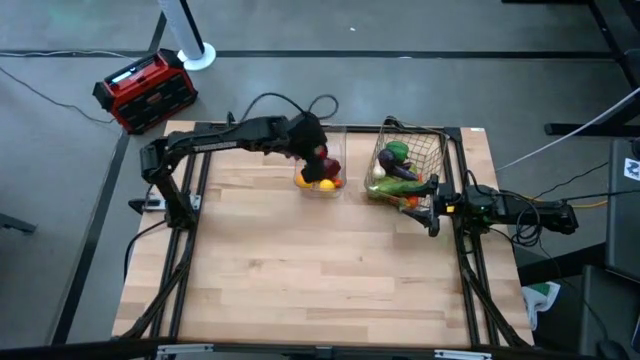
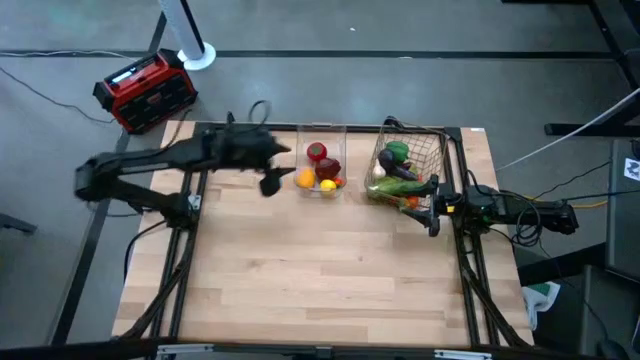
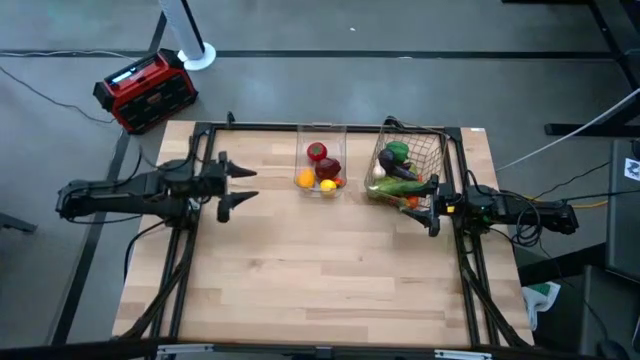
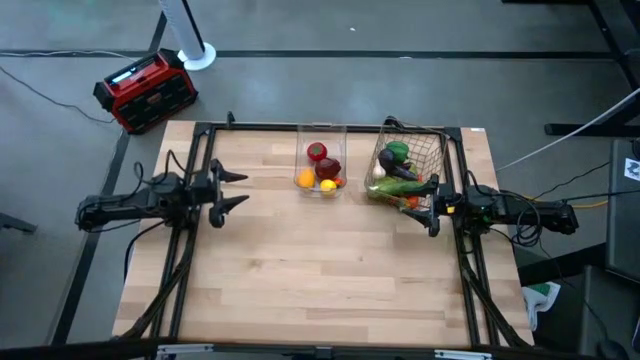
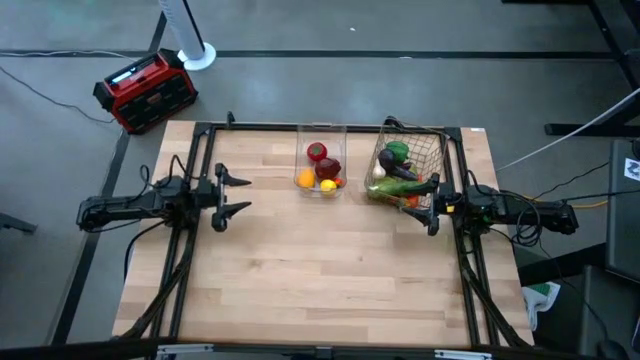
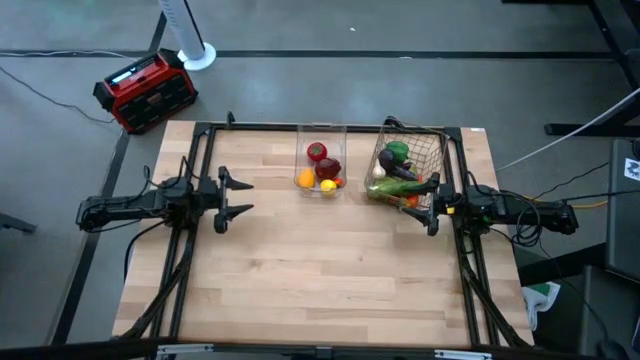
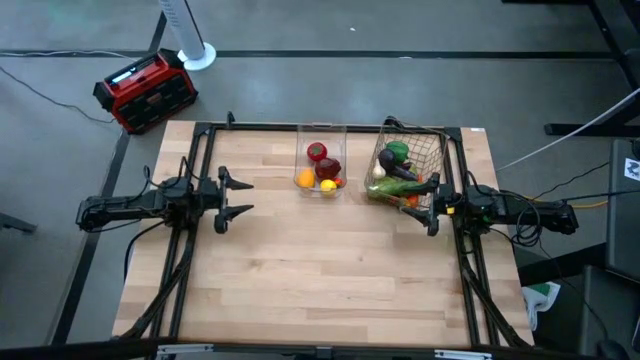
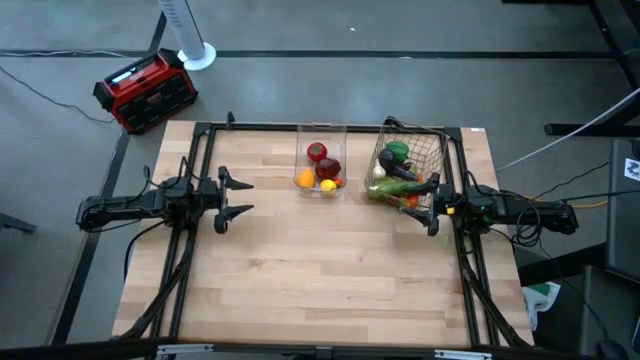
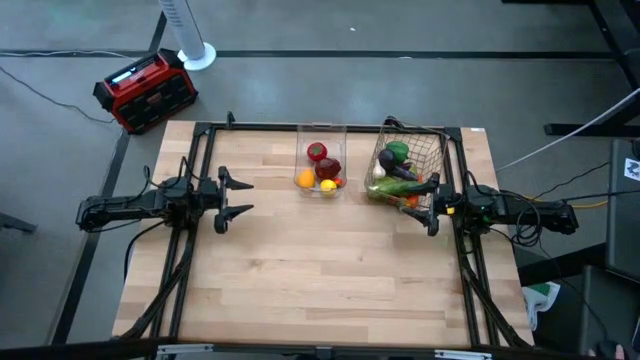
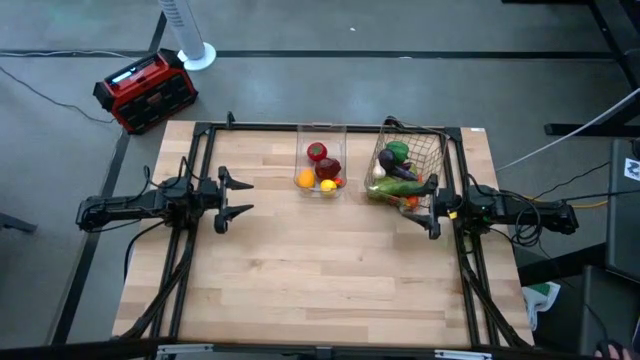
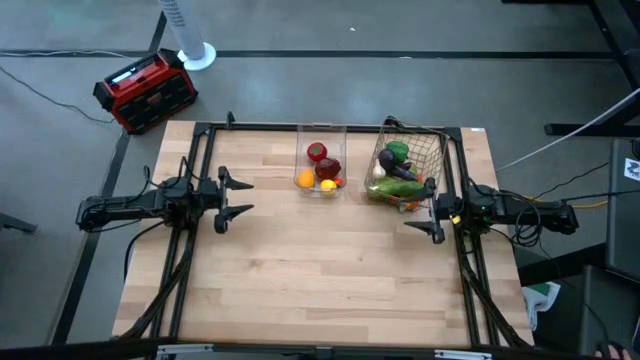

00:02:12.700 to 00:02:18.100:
Task: Sort produce into baskets
Return to Home Position

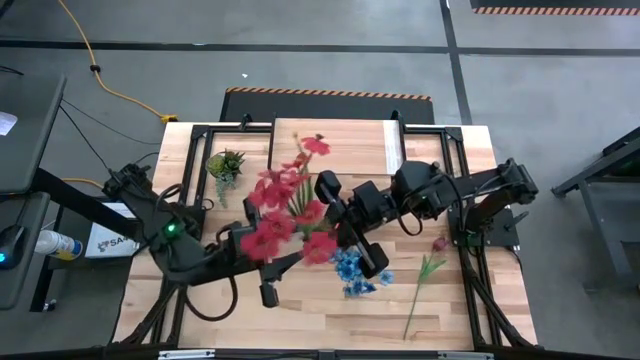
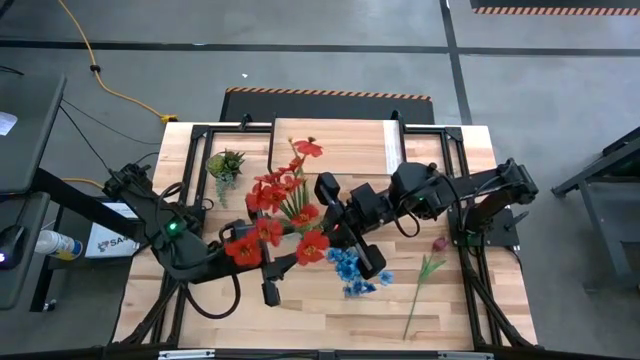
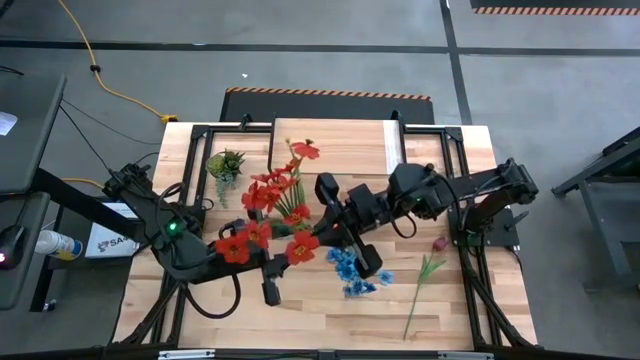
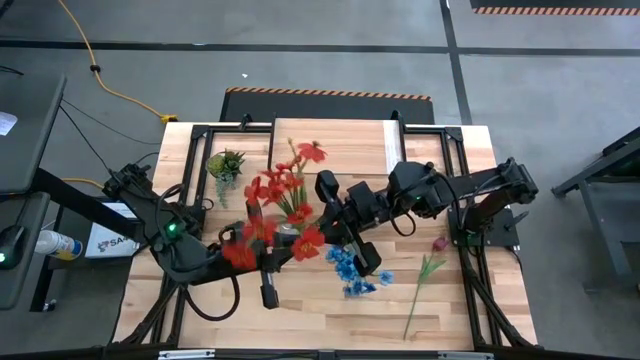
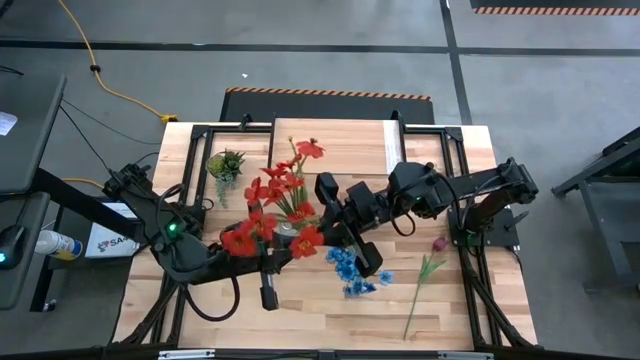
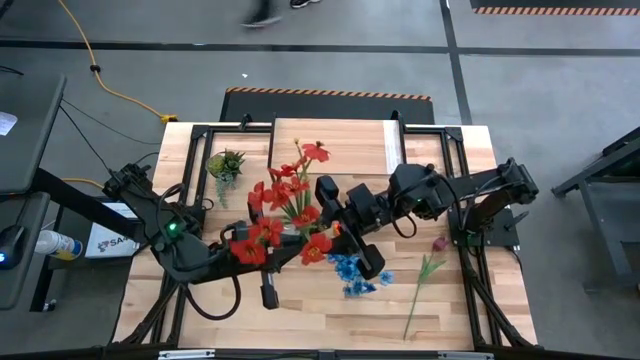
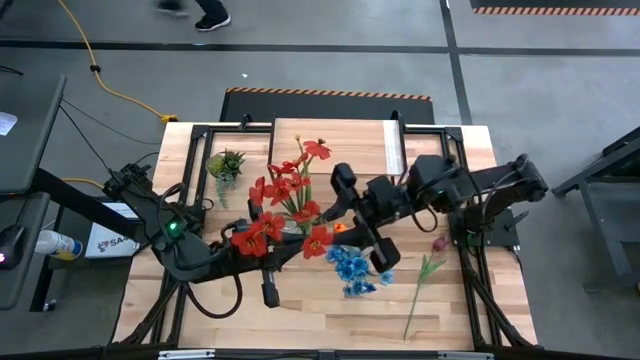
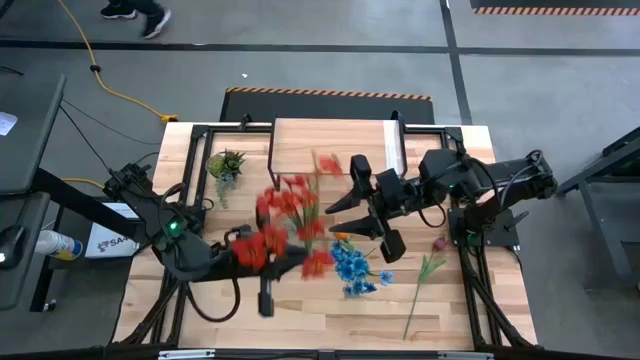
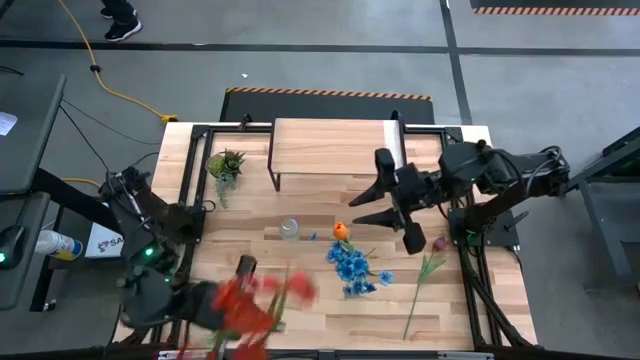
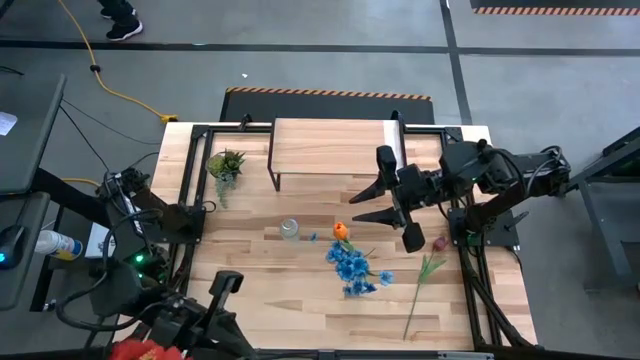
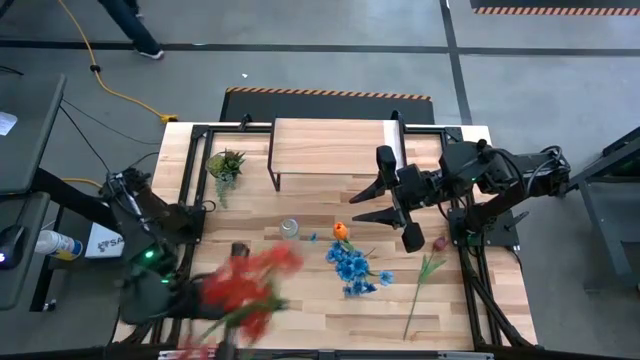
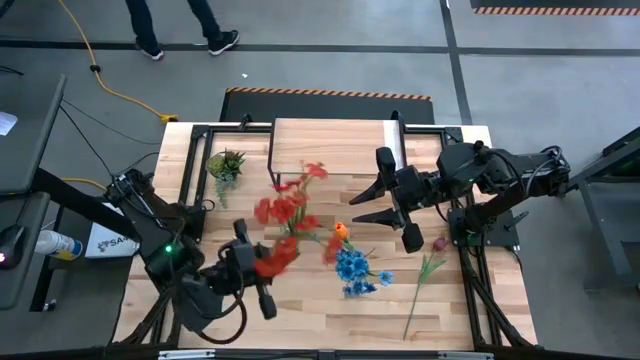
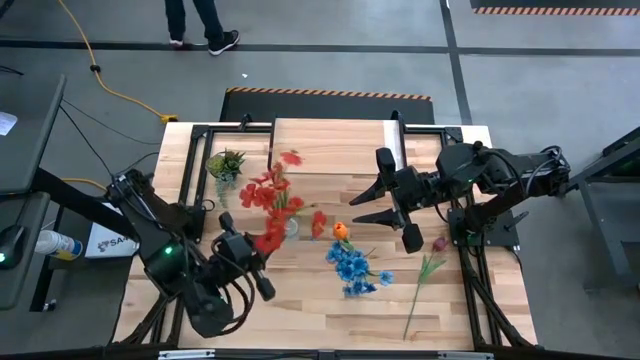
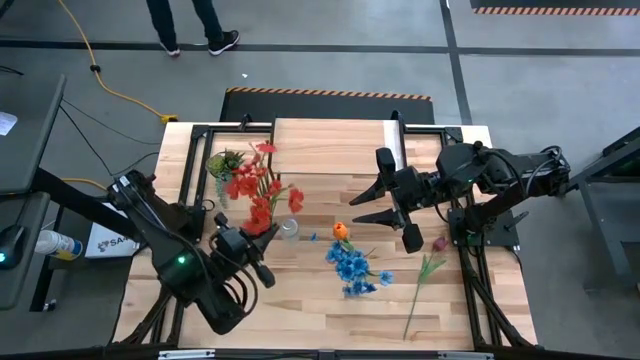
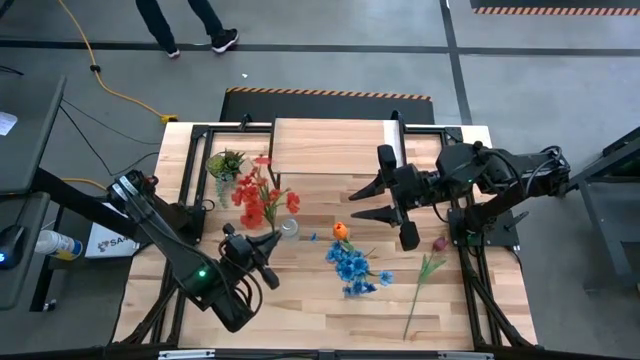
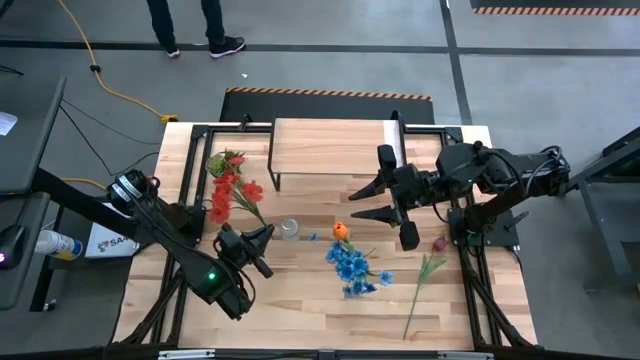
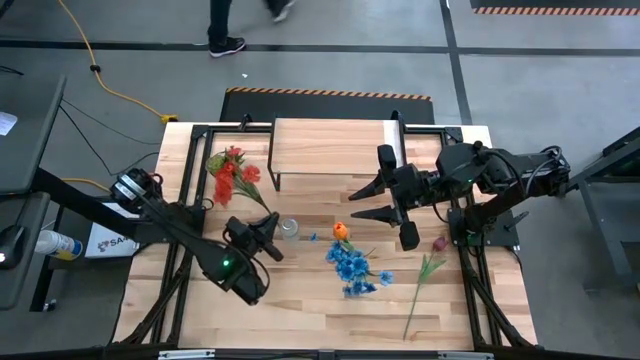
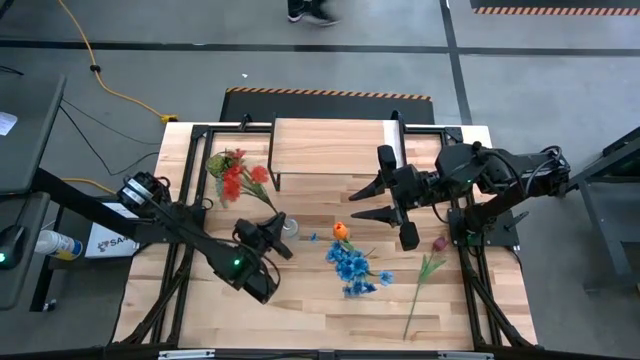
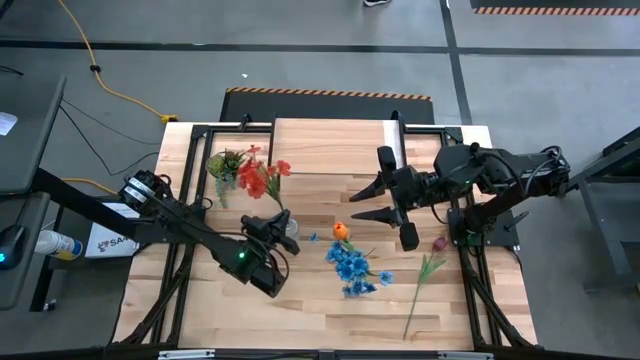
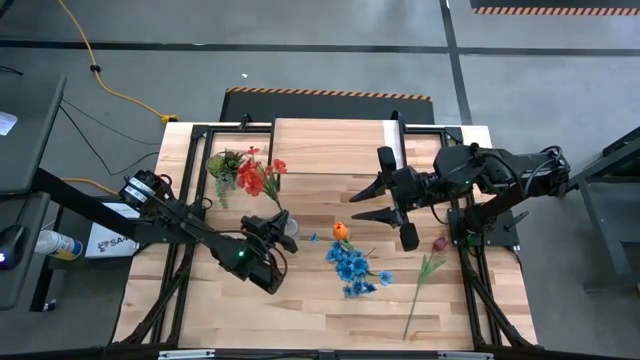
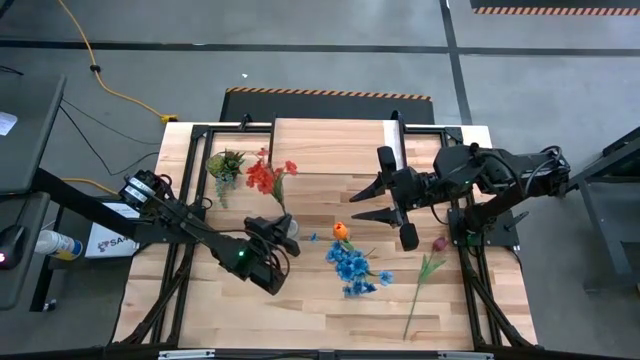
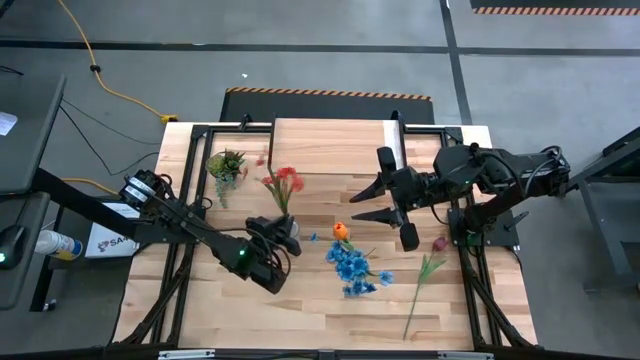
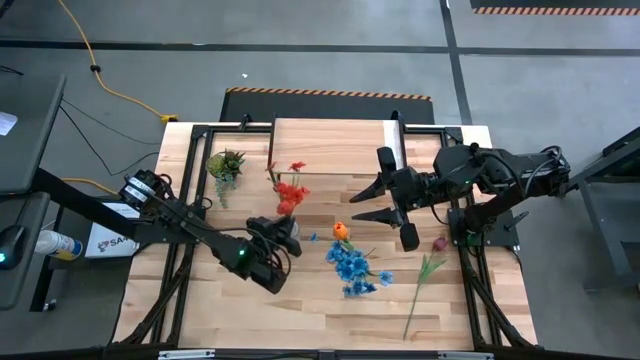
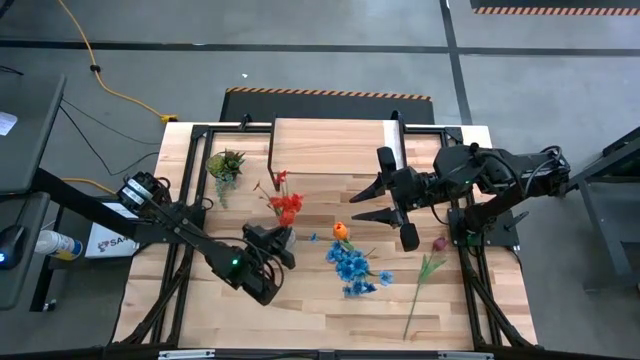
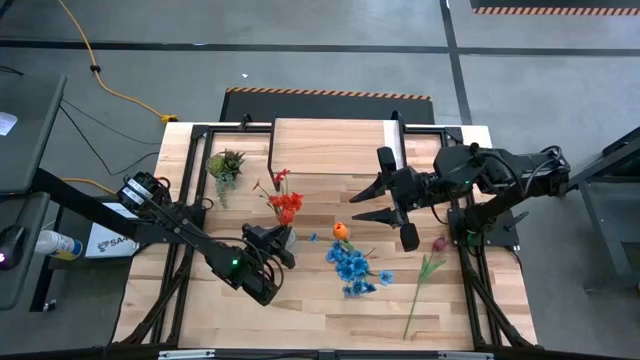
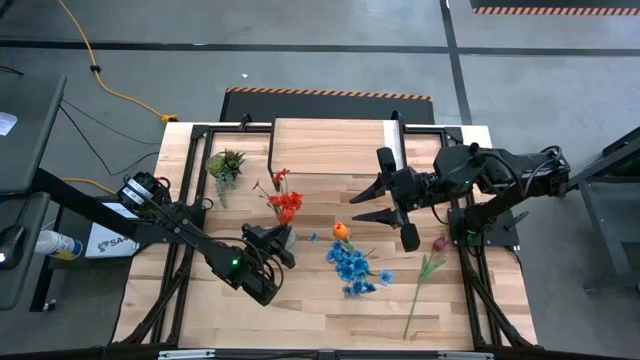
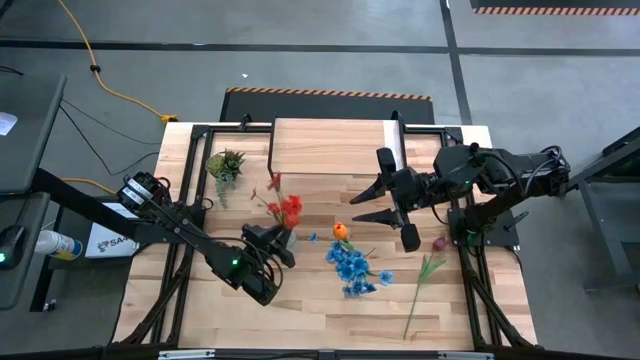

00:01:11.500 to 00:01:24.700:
Task: Pick and place flowers into a vace then onto a shelf
Put the red flowers into the left transparent vase
